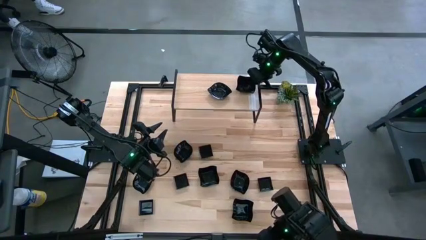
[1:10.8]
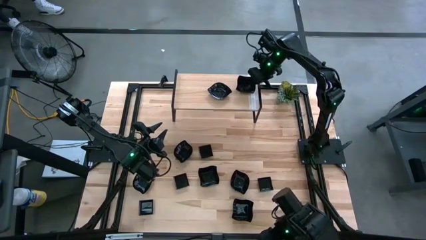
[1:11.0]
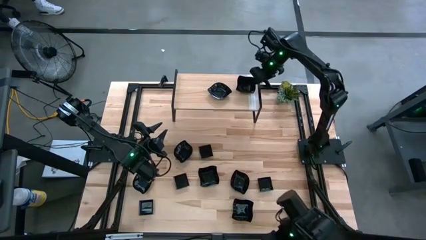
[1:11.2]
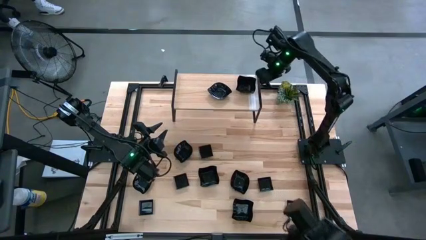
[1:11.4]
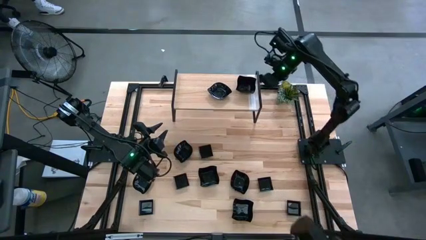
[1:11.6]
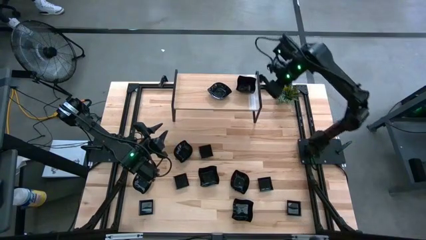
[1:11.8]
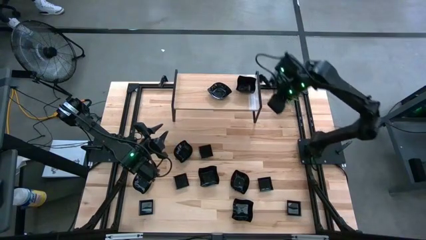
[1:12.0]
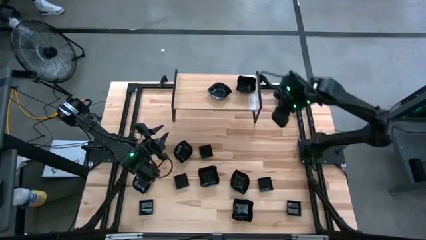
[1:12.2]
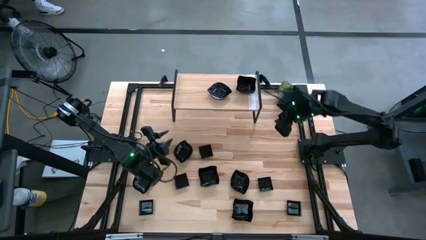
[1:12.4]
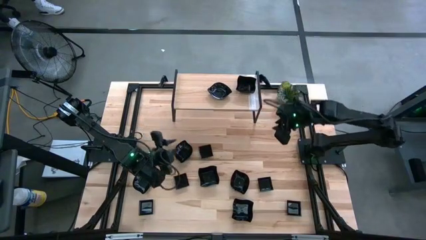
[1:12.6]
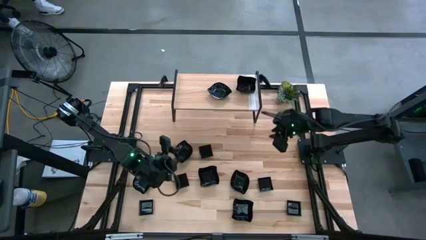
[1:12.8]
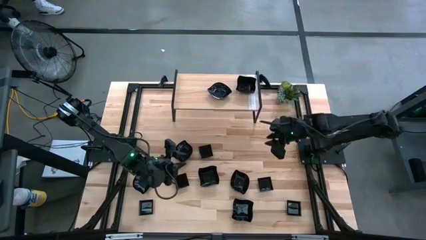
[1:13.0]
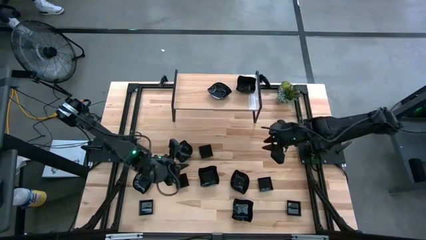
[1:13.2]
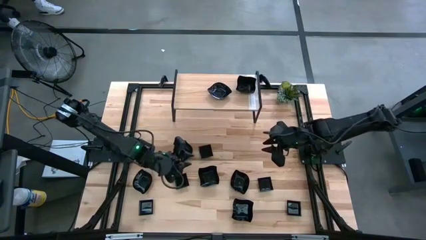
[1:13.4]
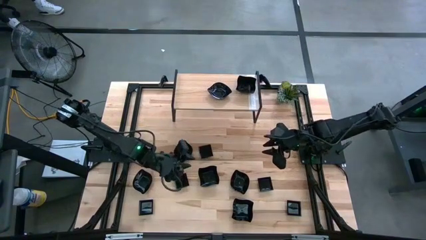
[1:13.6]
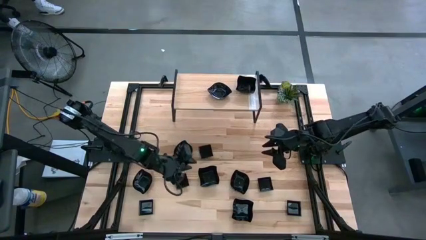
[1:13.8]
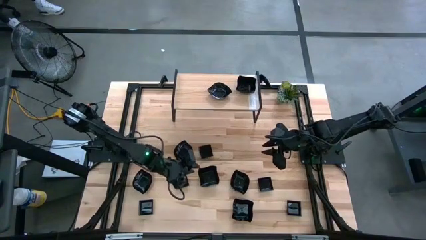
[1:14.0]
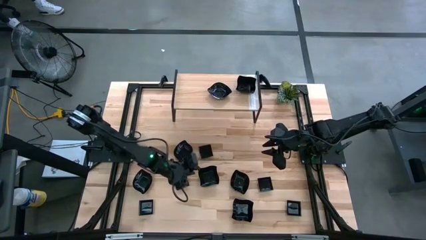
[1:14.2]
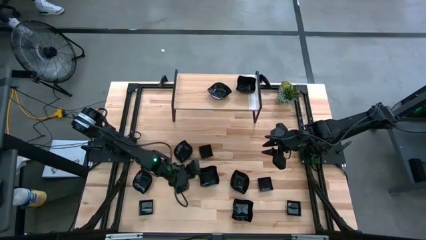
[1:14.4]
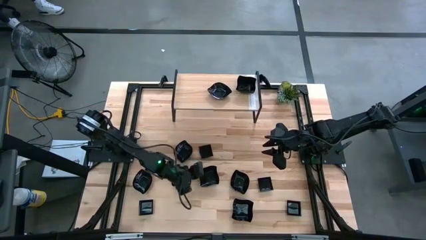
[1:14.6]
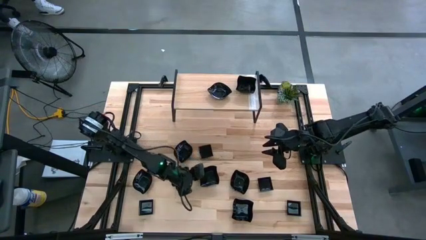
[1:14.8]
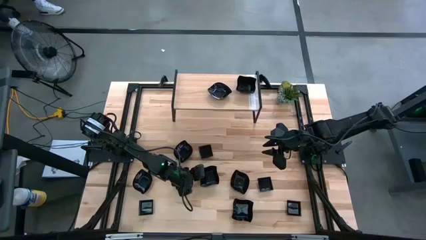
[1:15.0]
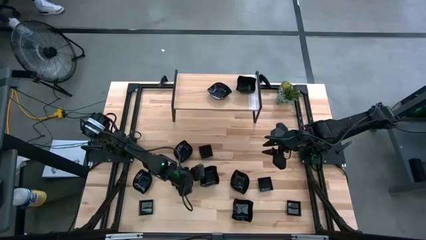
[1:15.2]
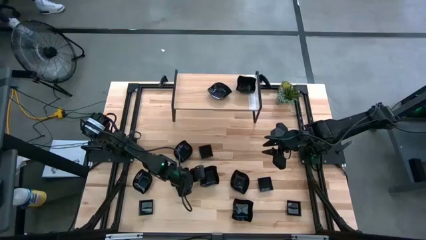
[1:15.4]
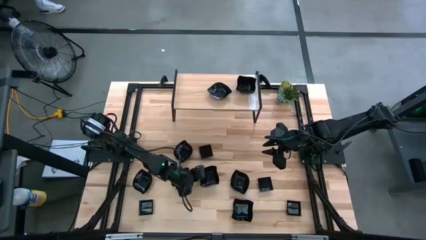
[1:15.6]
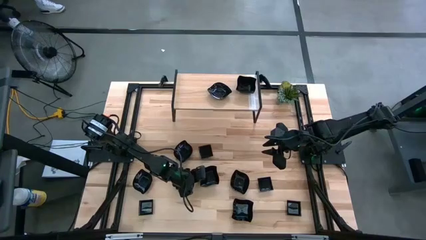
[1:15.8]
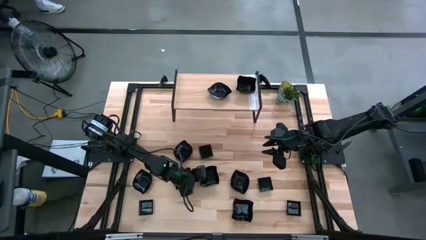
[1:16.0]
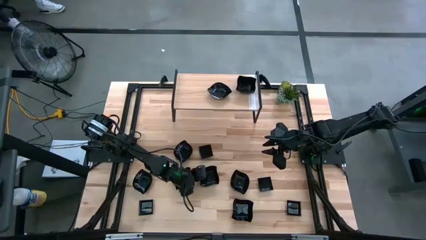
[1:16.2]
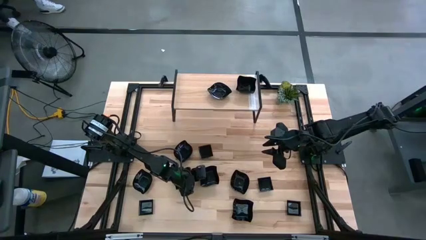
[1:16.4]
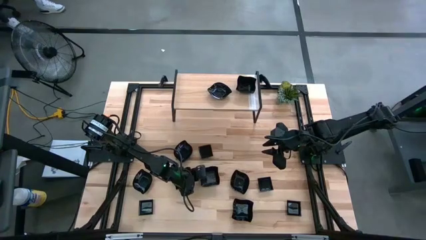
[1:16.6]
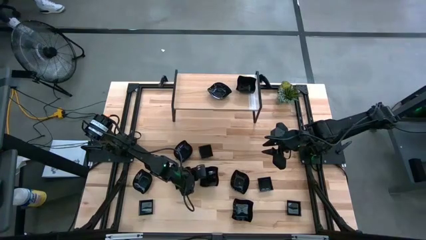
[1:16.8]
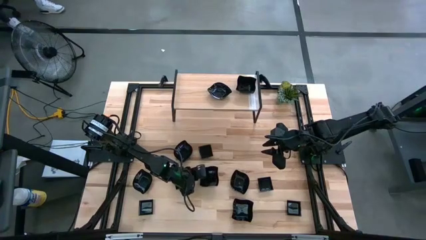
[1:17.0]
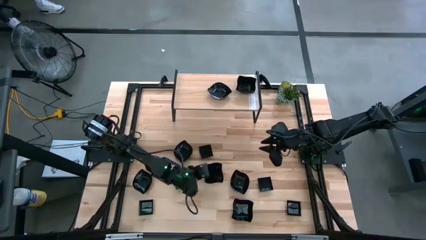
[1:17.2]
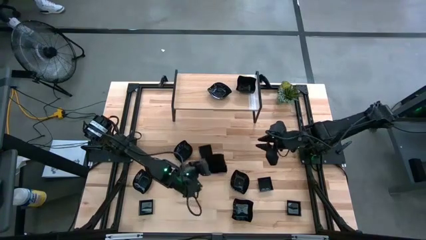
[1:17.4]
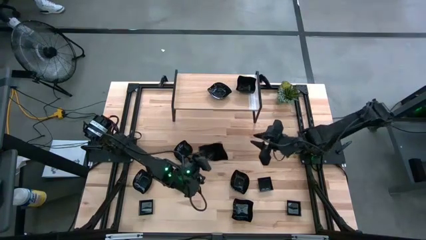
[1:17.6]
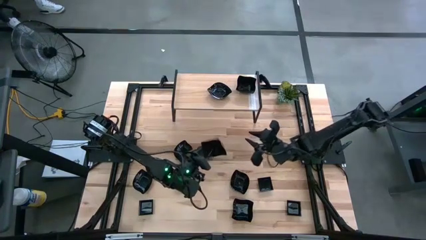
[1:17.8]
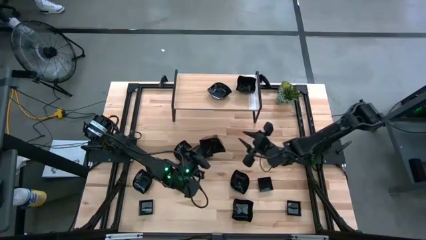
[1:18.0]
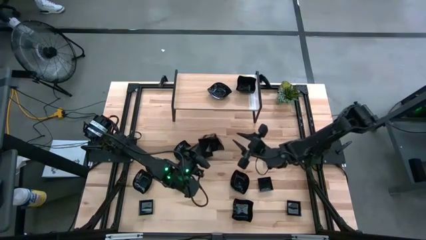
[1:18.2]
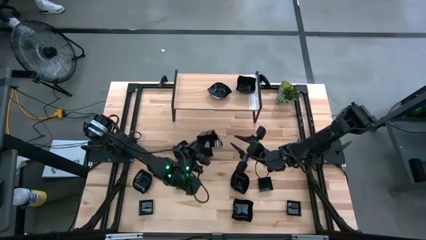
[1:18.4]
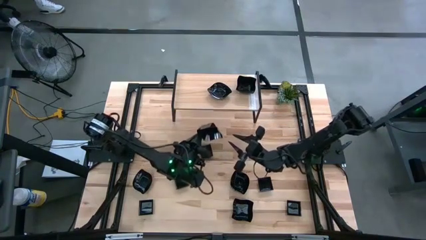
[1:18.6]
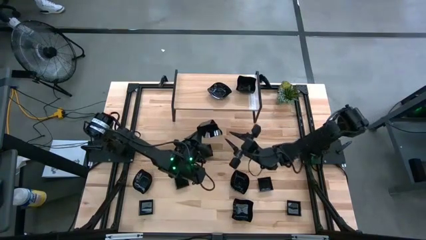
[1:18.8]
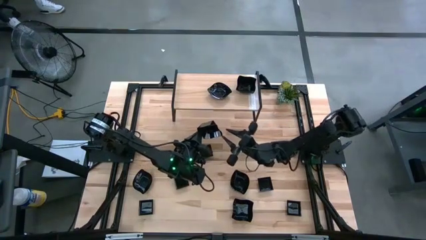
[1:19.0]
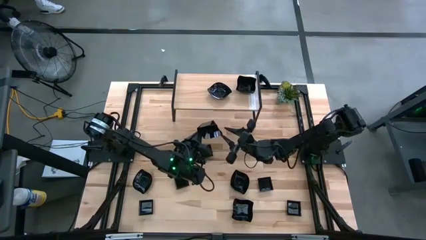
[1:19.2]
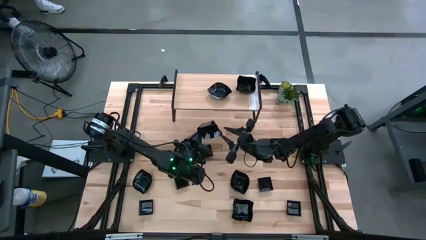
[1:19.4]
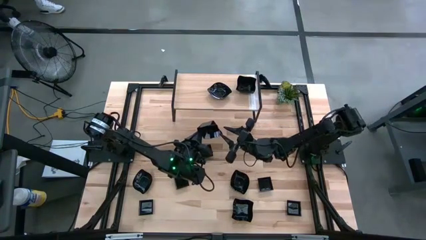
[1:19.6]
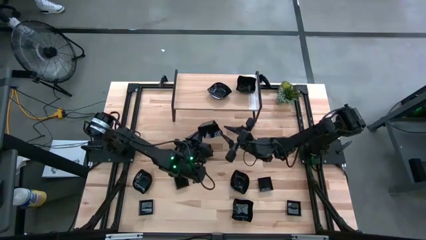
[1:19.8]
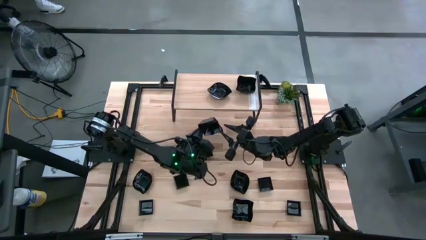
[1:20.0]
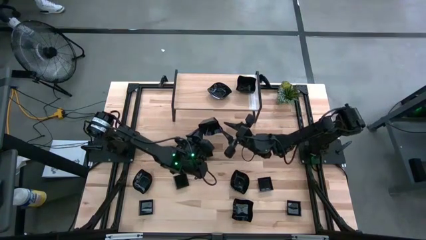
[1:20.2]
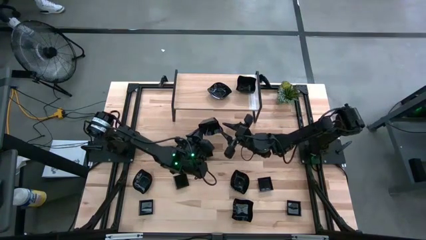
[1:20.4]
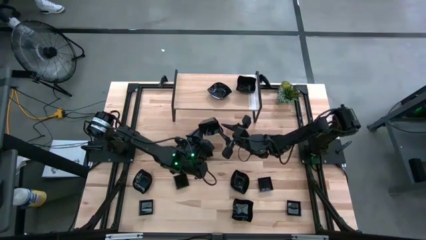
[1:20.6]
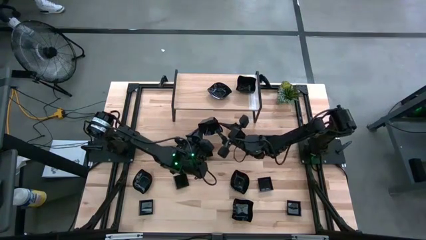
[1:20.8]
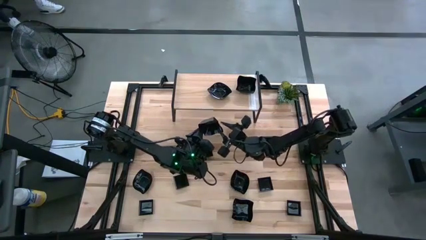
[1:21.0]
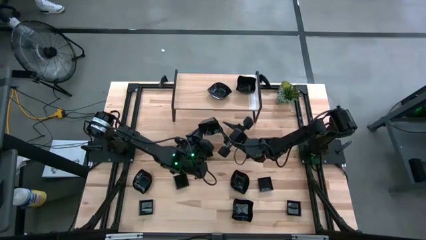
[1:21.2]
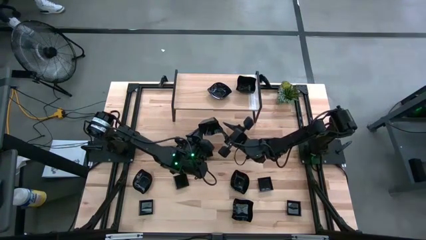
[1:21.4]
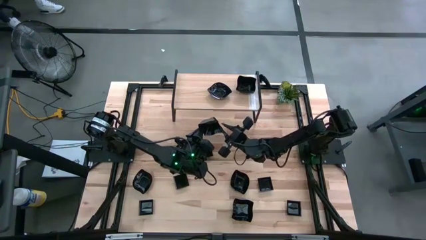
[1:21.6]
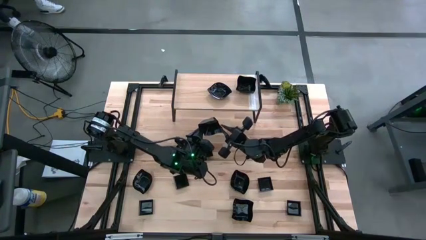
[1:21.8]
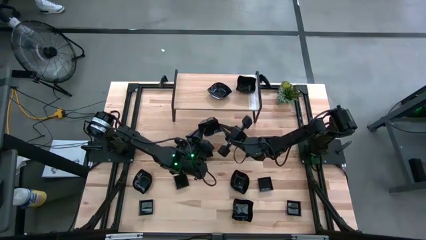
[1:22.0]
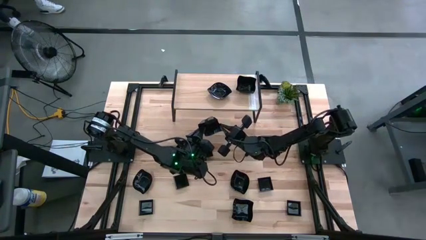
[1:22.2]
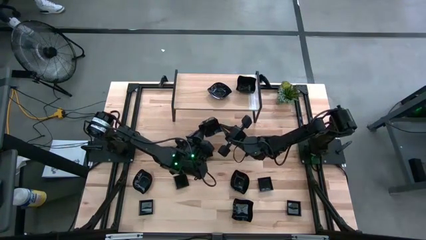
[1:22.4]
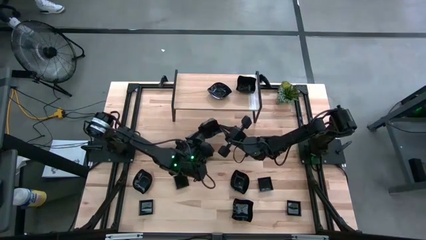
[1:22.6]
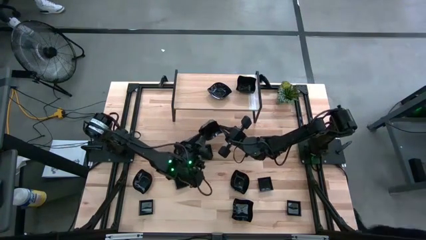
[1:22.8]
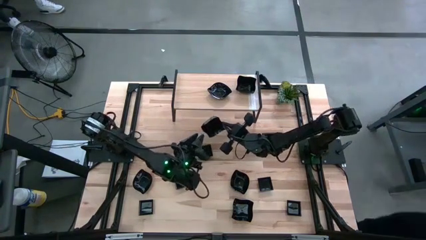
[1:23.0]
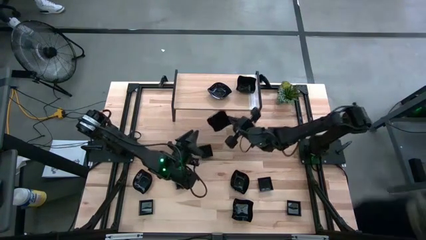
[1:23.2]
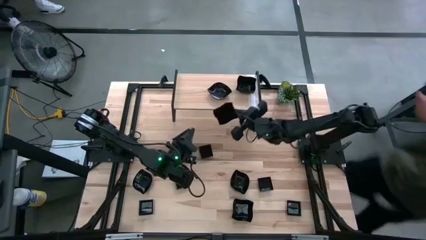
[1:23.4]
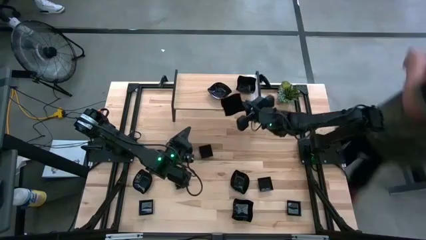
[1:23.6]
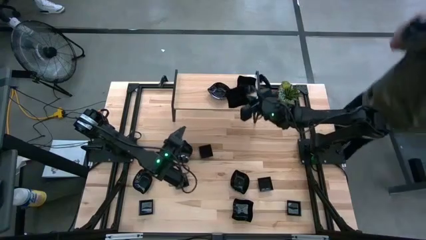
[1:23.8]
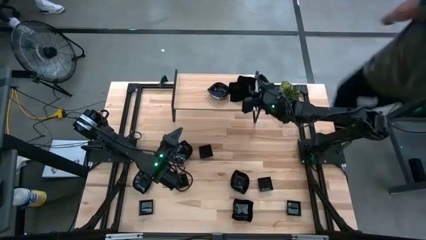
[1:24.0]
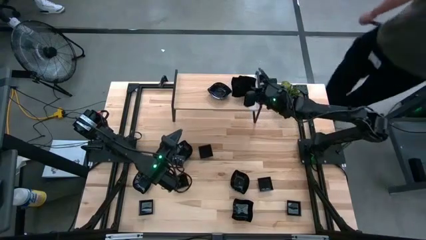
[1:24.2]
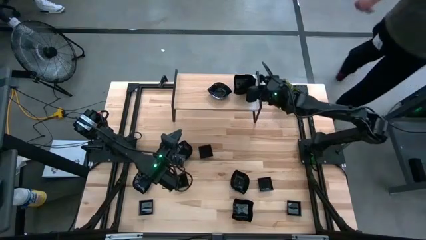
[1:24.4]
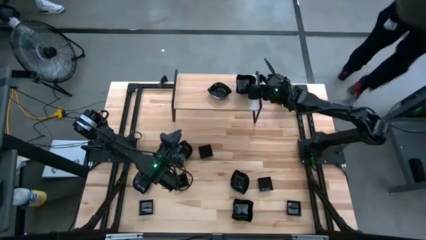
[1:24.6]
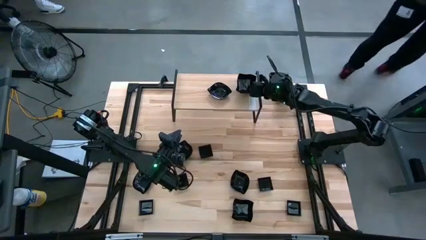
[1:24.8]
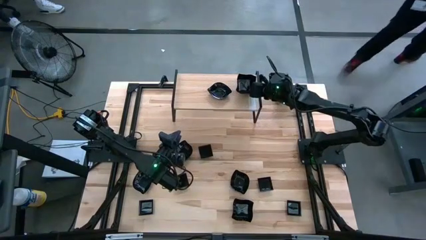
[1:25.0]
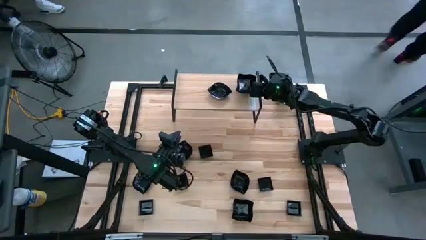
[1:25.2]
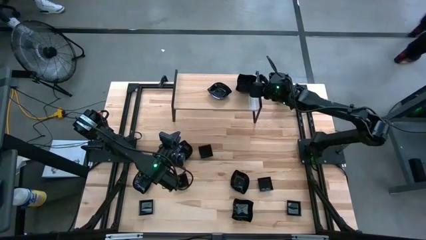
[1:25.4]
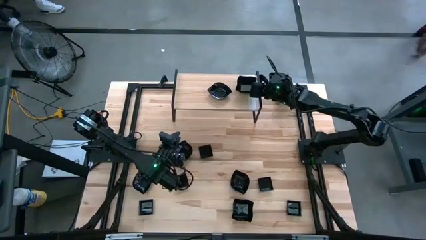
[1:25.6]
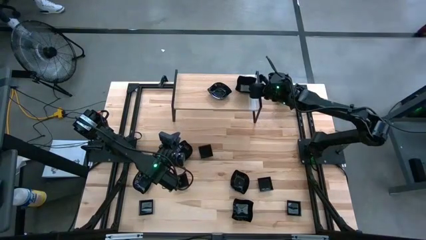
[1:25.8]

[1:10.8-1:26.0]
Task: Pick & Place Mini shaped plates
Stack the distorted square plate on top of the other distorted square plates on the shelf
